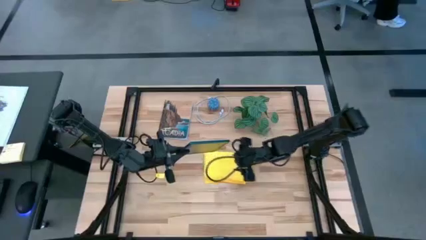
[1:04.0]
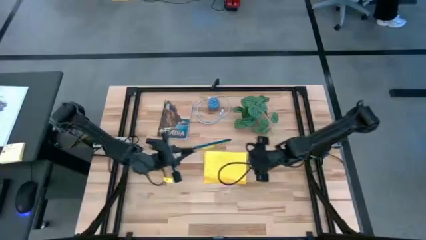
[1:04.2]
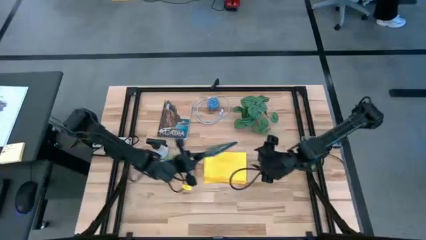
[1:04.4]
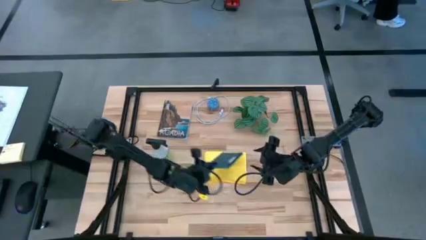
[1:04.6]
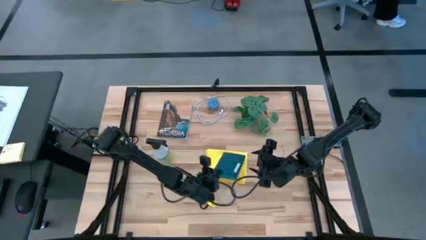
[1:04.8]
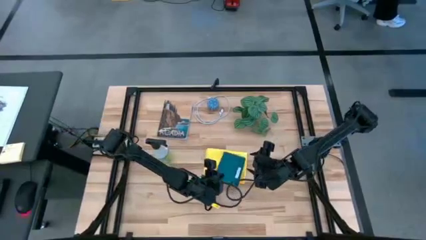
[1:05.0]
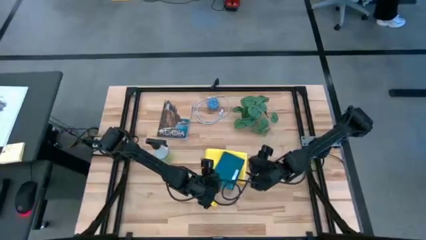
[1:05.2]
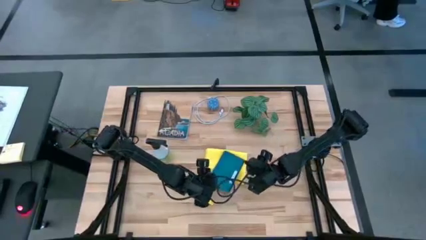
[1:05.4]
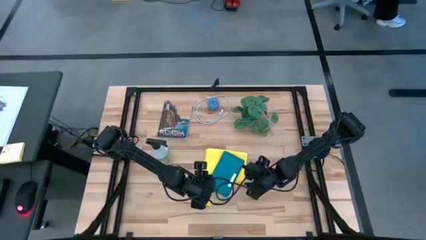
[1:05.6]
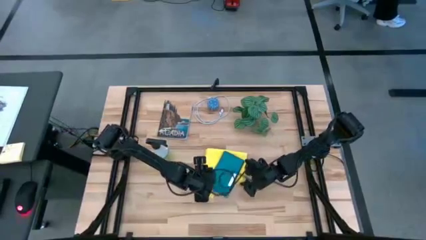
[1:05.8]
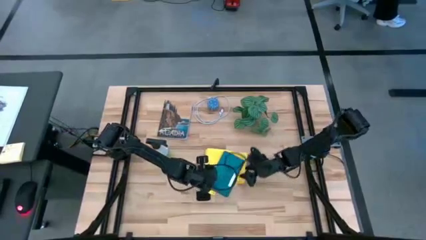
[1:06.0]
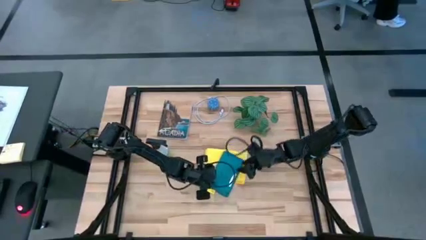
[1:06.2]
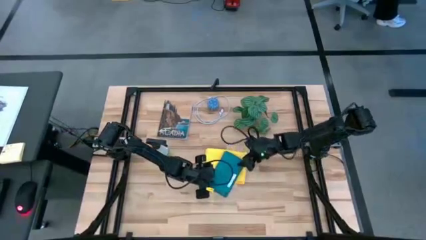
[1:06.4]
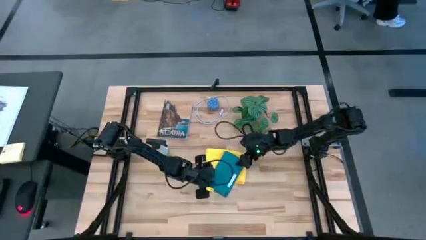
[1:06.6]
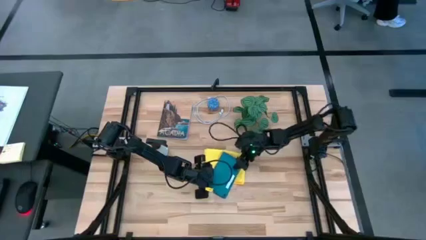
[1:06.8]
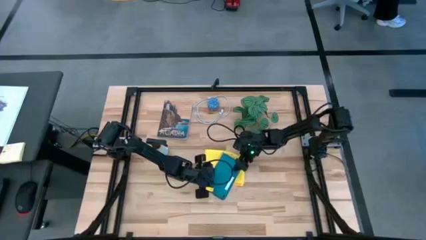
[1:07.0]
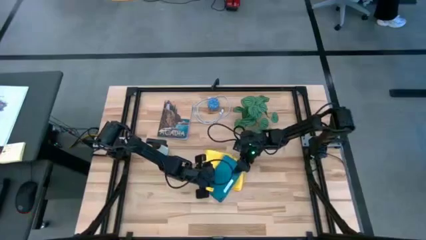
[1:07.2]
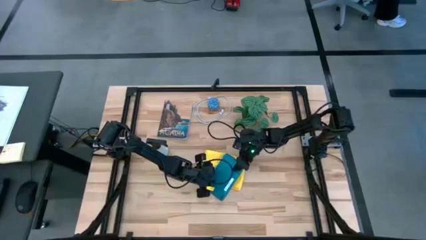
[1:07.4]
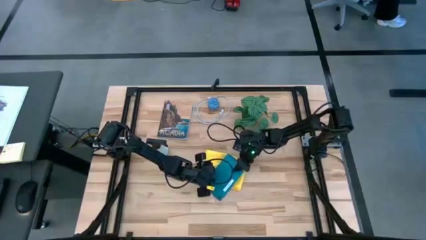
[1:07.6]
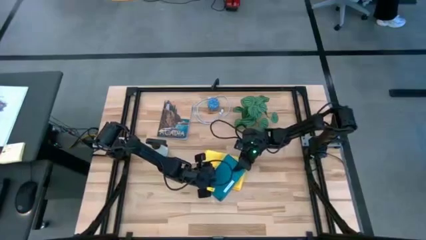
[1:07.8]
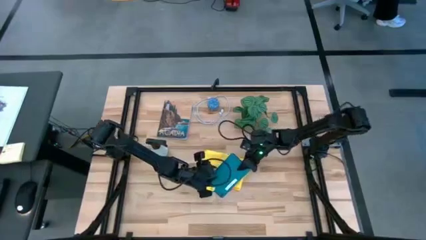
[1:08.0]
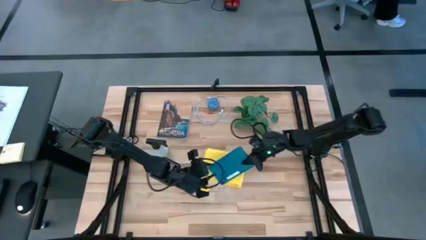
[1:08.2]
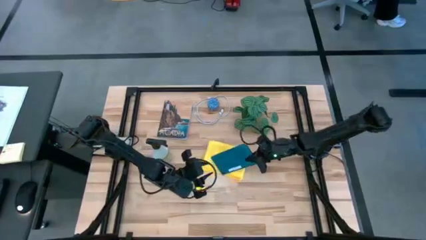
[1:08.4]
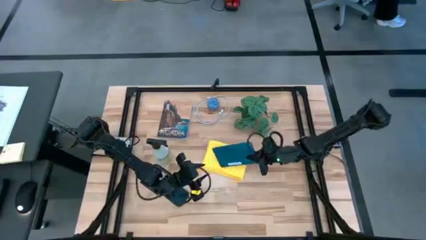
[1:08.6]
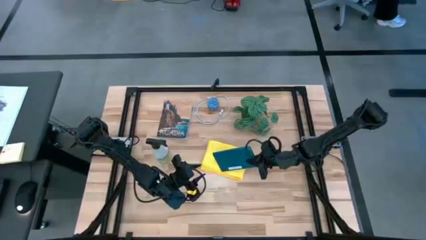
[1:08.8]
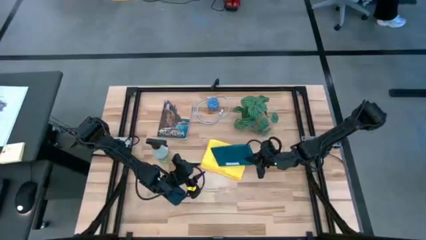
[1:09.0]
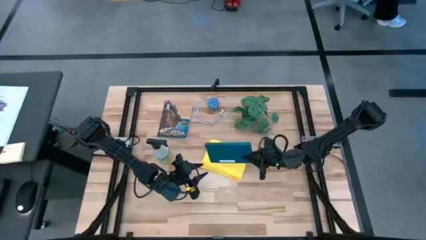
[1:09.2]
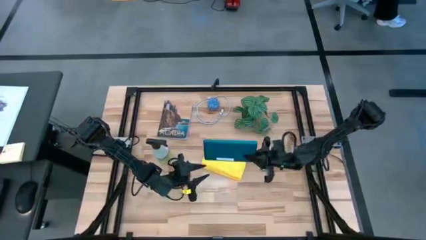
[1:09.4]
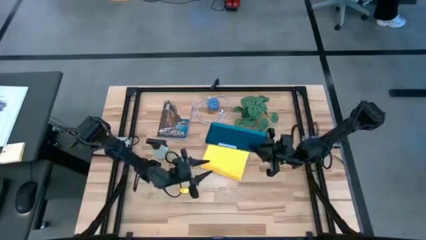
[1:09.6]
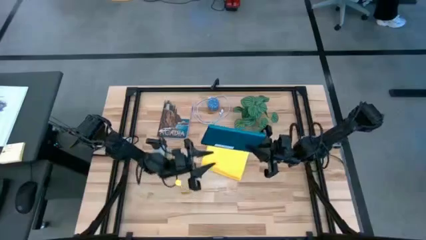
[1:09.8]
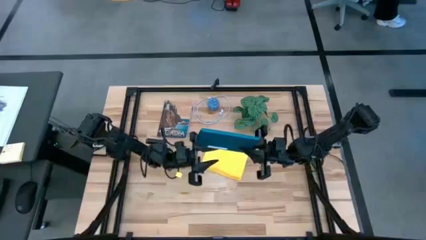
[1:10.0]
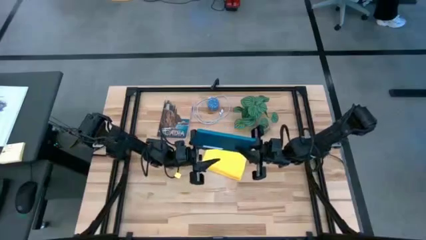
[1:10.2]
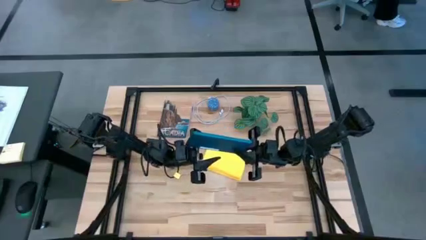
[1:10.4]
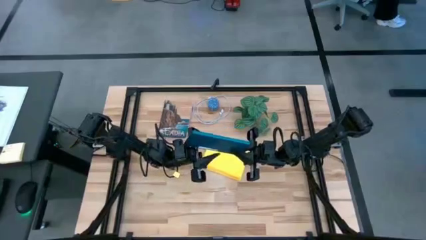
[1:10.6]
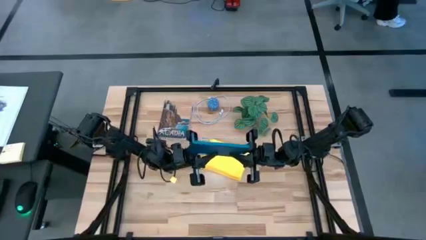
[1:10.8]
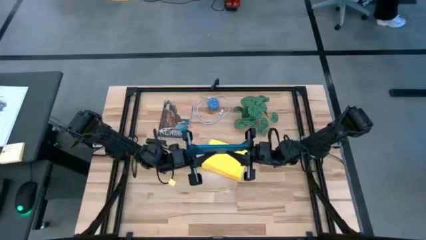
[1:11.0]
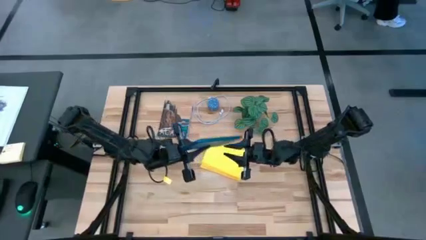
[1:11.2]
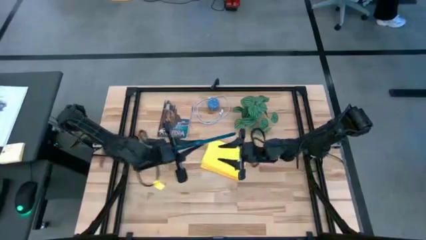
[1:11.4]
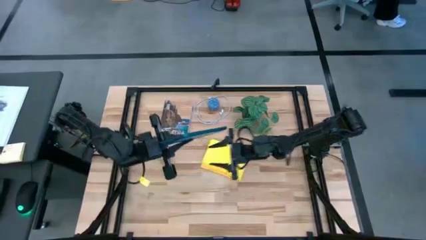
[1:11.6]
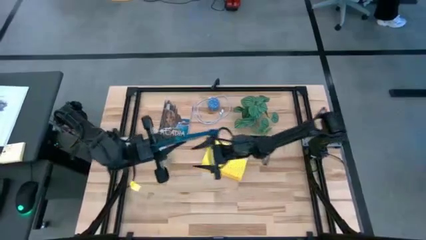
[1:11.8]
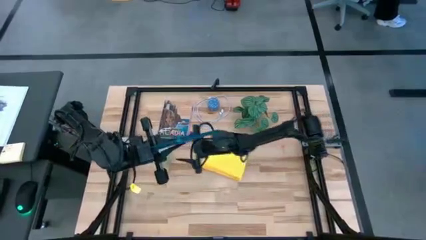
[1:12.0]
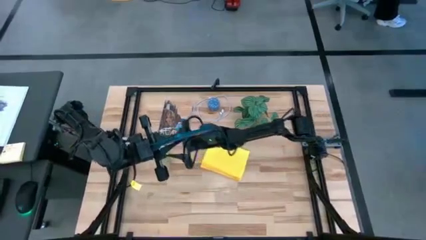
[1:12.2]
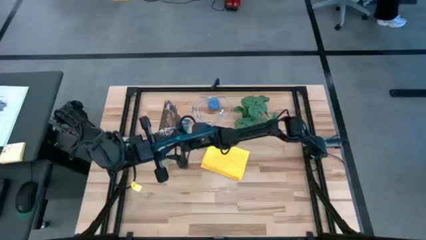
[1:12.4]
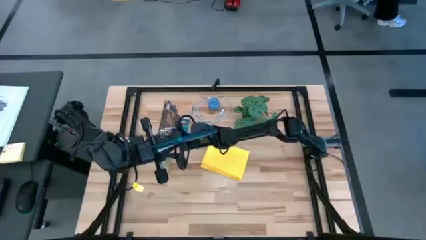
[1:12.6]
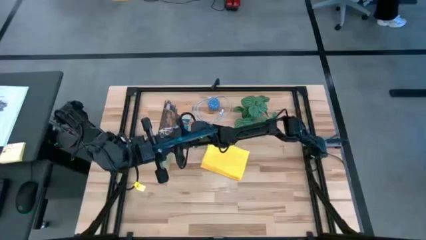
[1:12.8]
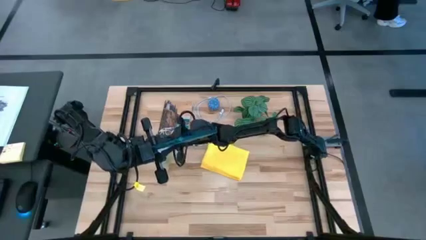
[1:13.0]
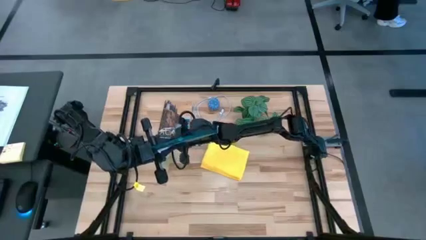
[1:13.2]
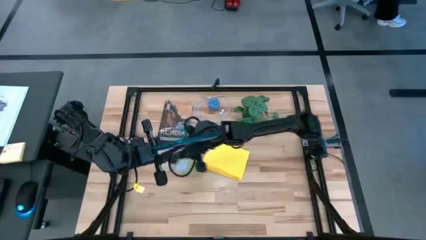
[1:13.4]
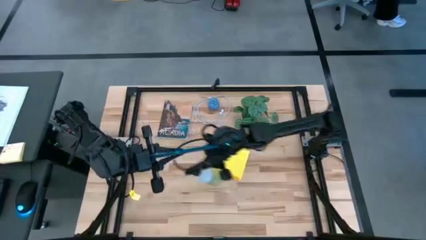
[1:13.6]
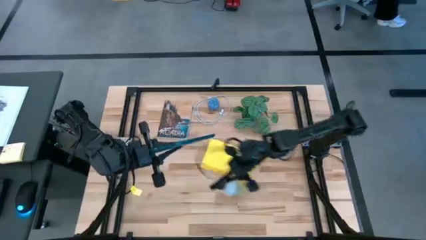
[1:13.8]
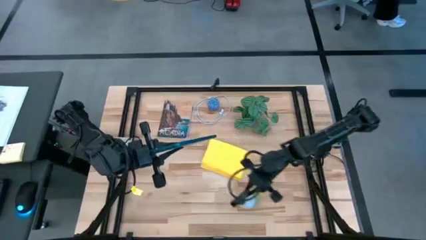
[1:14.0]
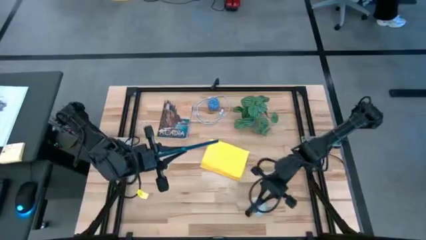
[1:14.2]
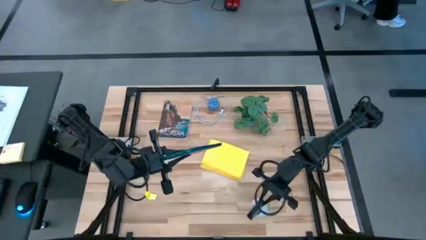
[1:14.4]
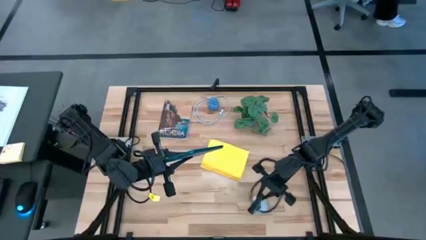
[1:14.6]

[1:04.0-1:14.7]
Task: Apply microfiber cloth
Spray the blue tablet using the cleaning bottle
